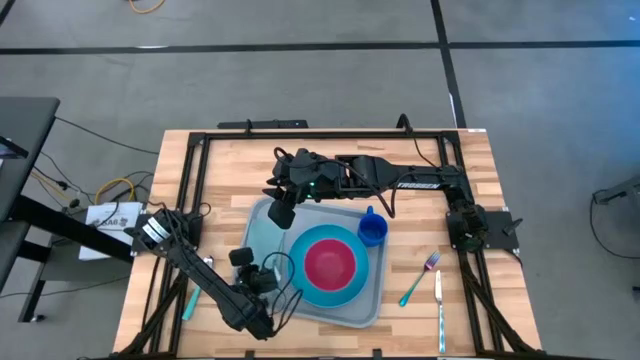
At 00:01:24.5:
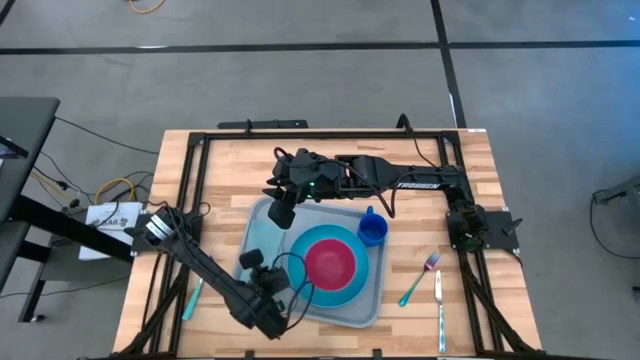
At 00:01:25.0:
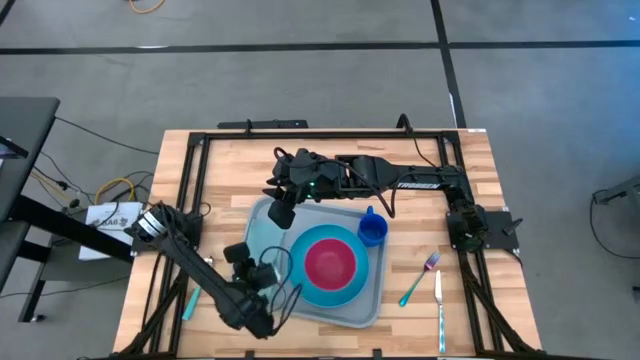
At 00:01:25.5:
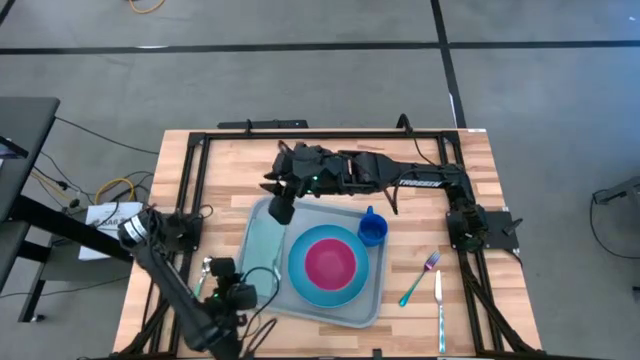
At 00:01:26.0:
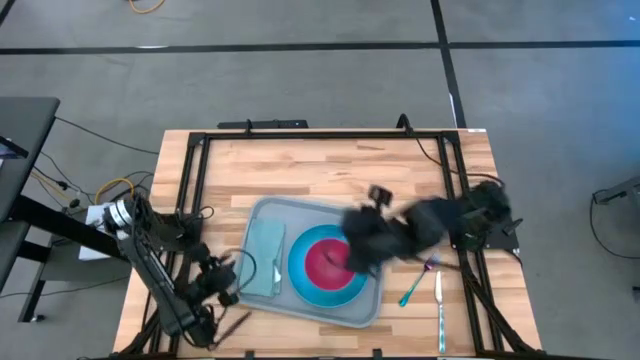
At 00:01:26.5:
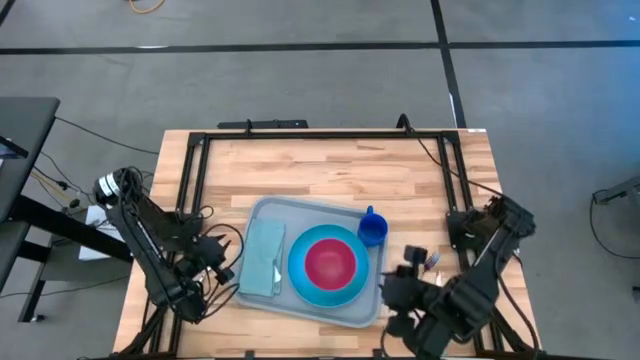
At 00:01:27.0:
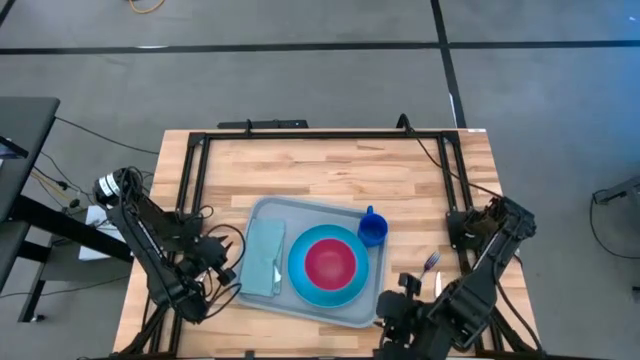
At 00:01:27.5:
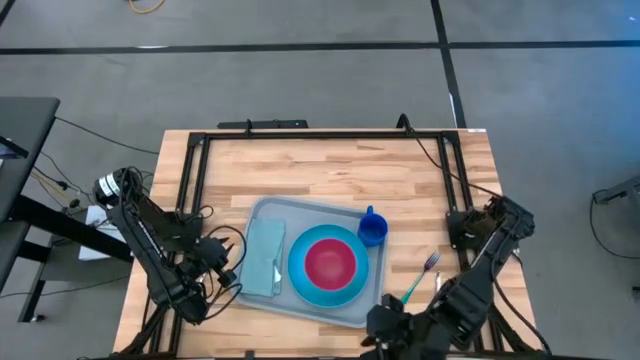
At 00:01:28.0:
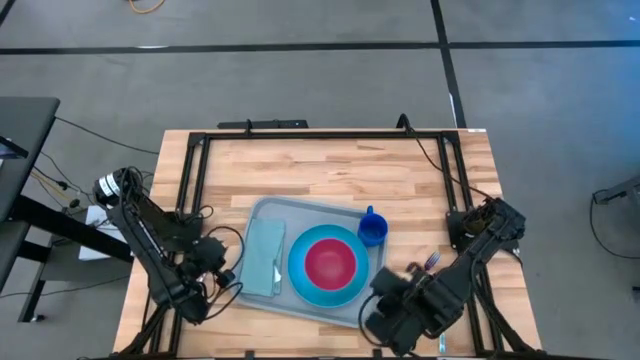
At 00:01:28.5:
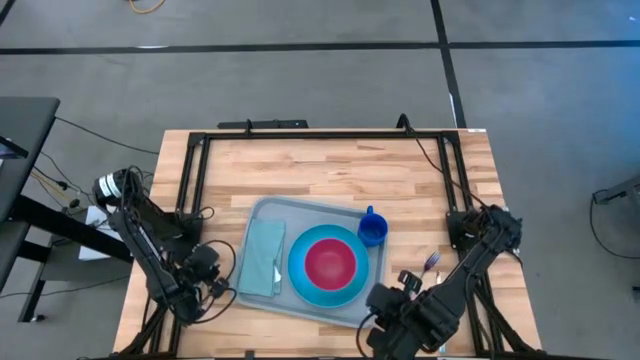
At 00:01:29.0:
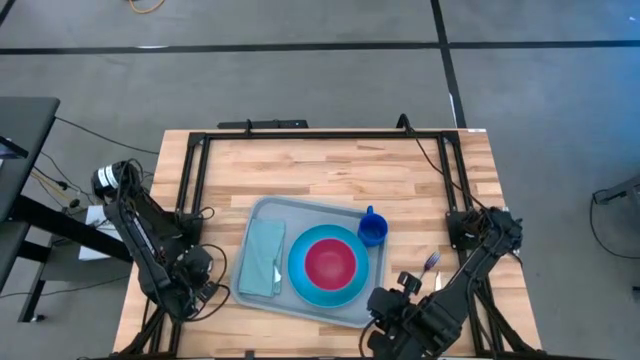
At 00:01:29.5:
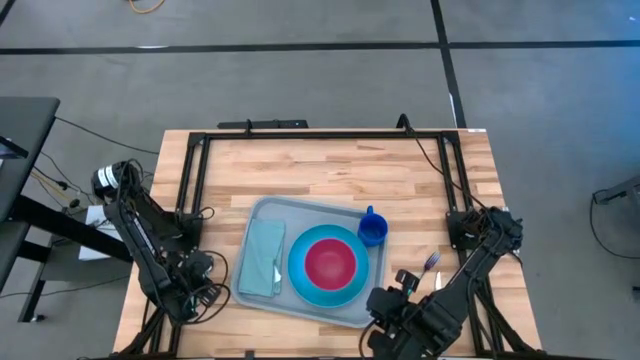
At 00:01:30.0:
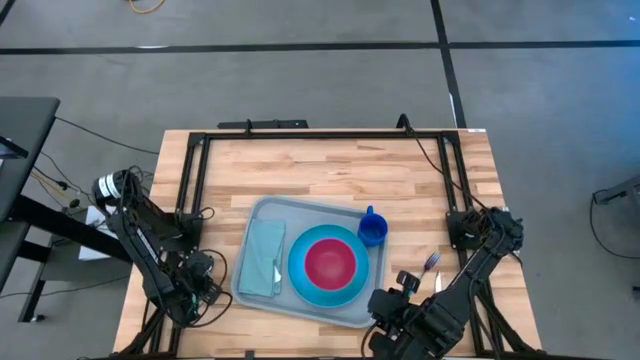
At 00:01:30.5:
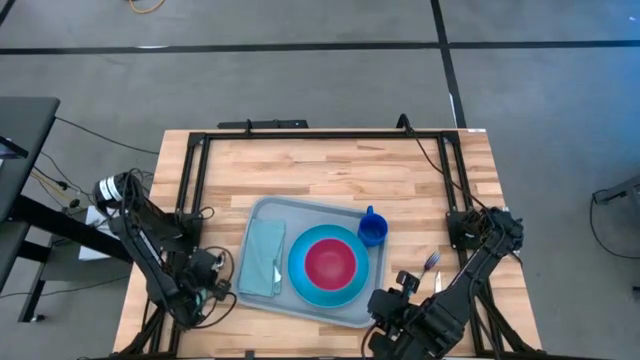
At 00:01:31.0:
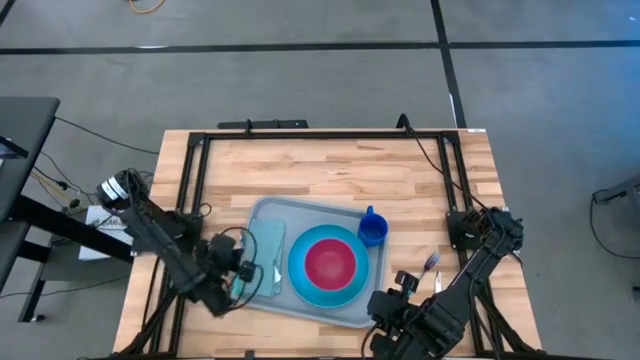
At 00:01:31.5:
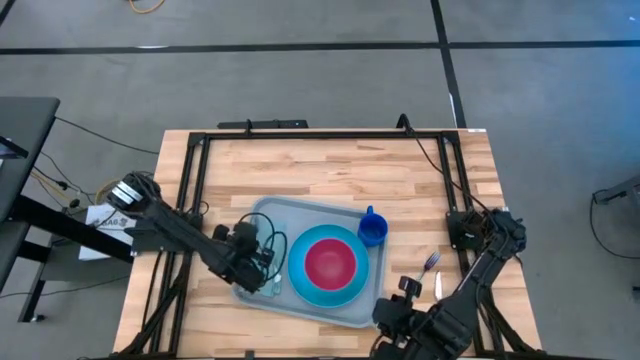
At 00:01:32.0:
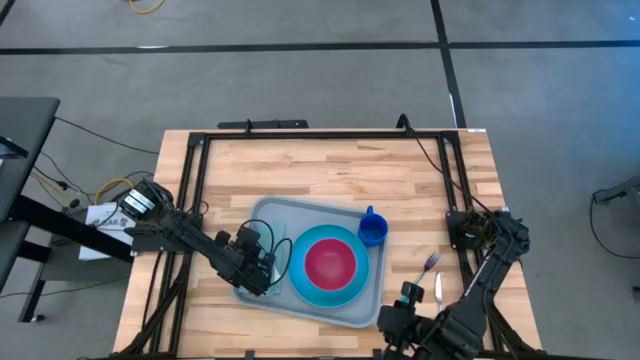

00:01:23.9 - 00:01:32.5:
Task: Set up tray
Put the light green spoon on top of the green table napkin

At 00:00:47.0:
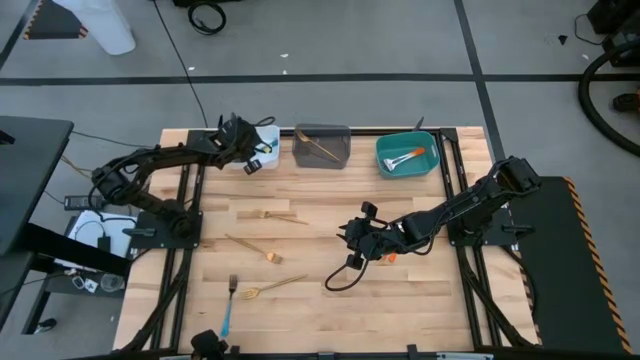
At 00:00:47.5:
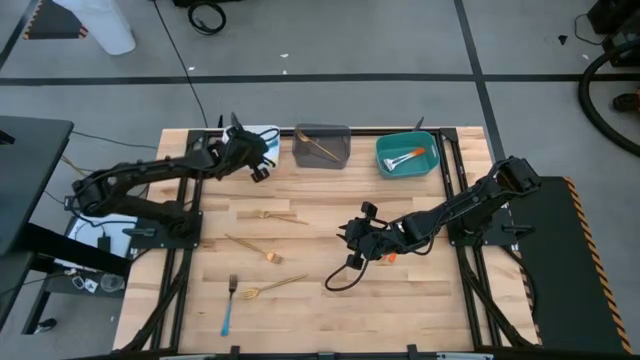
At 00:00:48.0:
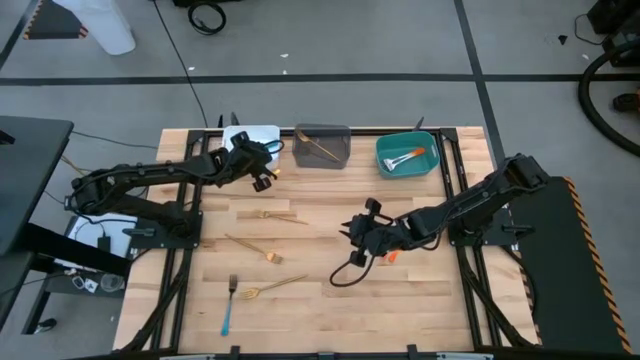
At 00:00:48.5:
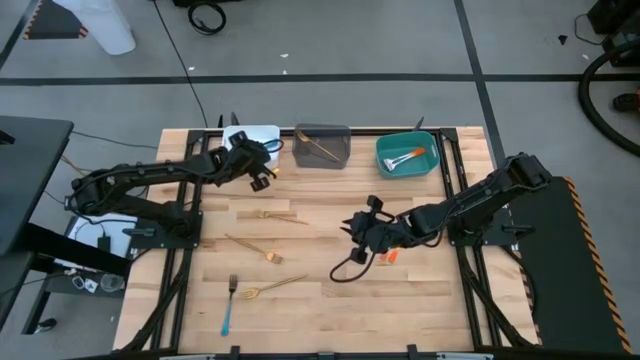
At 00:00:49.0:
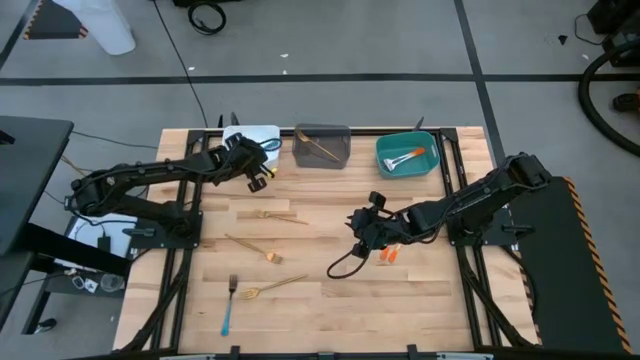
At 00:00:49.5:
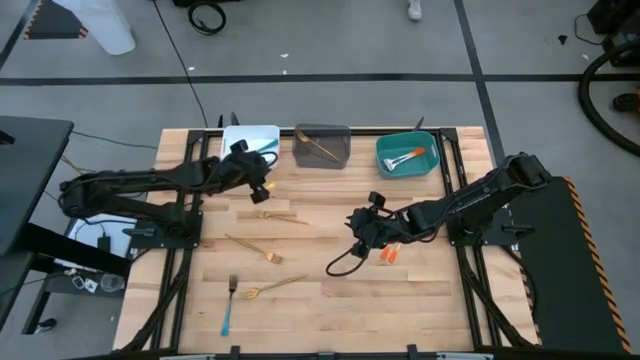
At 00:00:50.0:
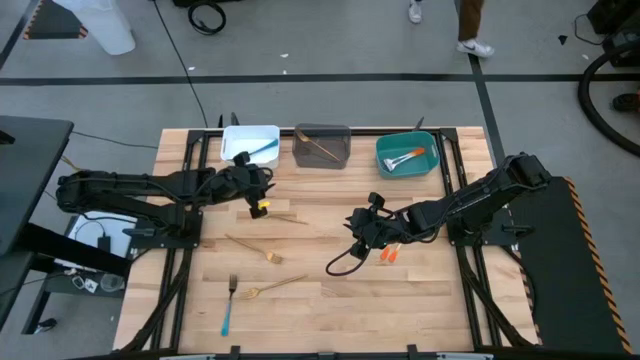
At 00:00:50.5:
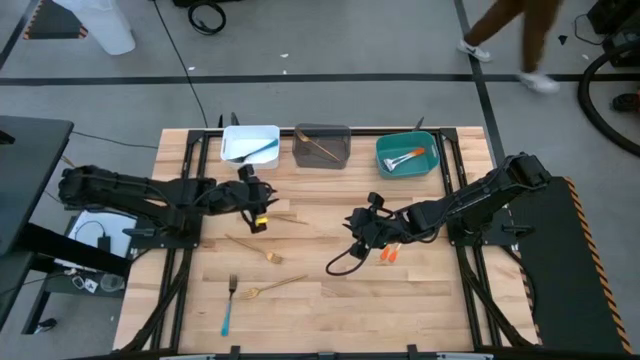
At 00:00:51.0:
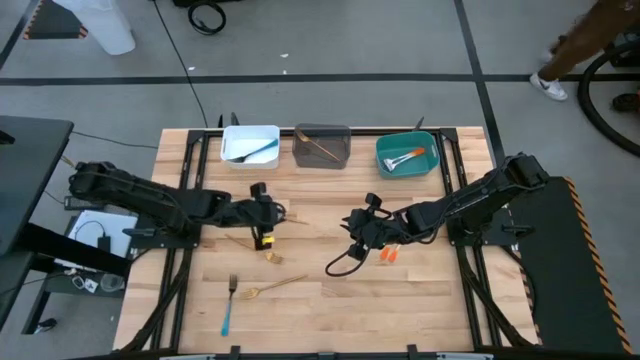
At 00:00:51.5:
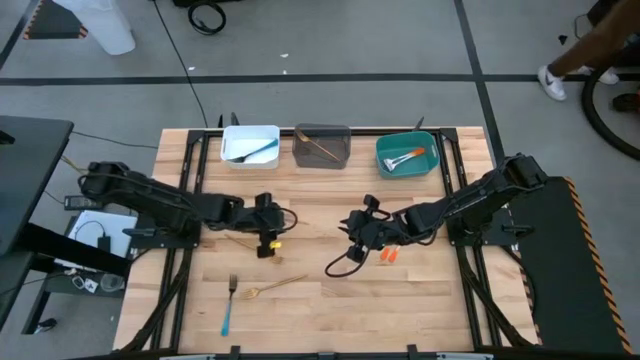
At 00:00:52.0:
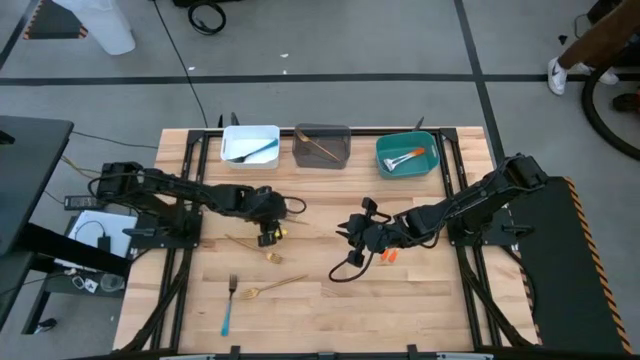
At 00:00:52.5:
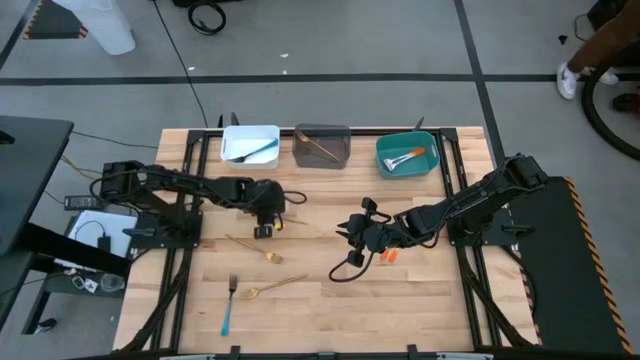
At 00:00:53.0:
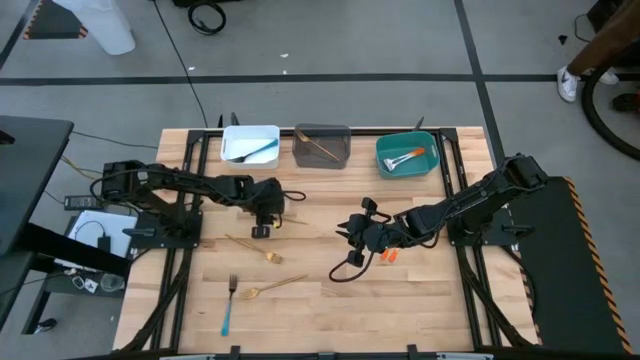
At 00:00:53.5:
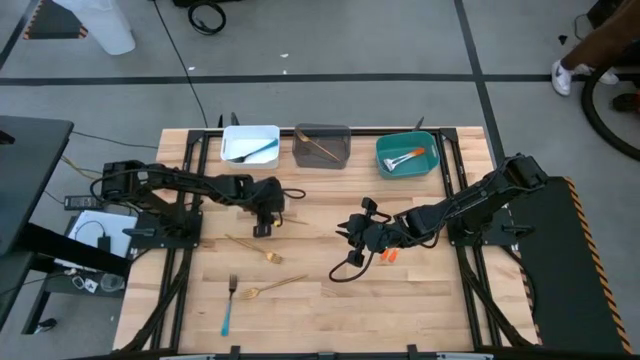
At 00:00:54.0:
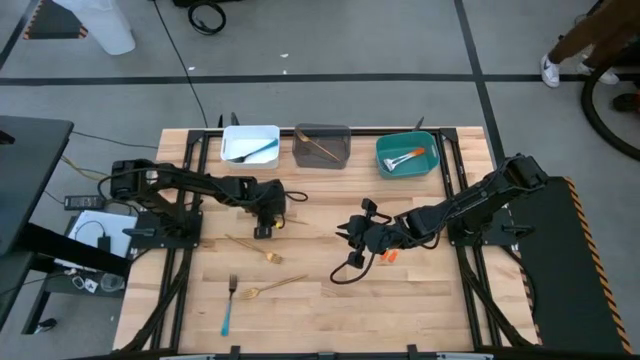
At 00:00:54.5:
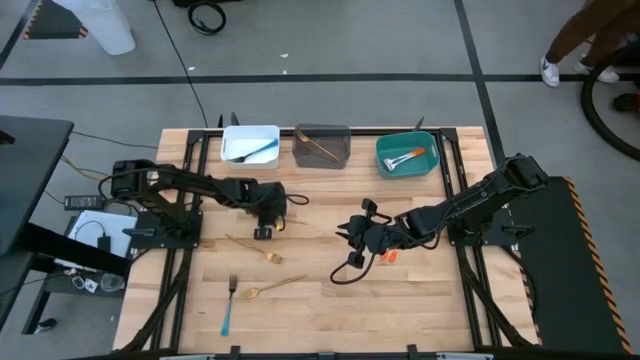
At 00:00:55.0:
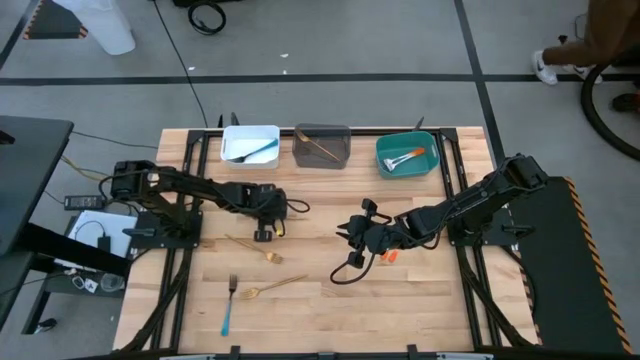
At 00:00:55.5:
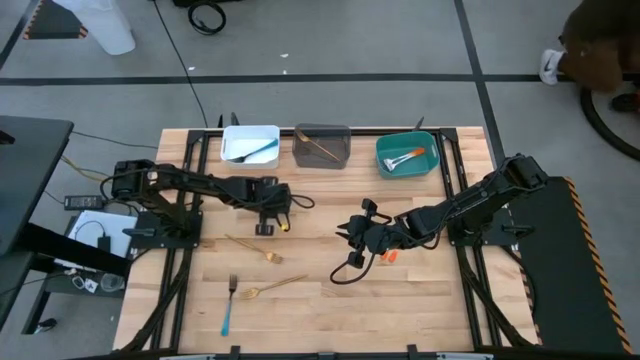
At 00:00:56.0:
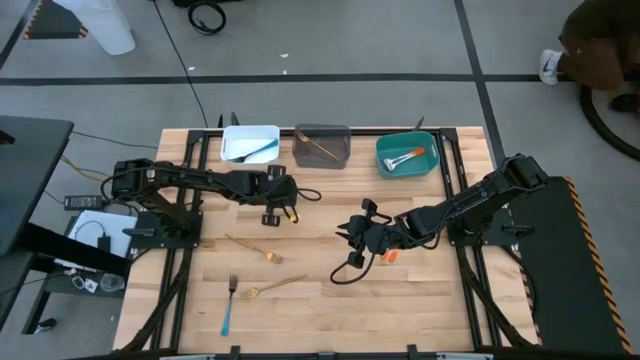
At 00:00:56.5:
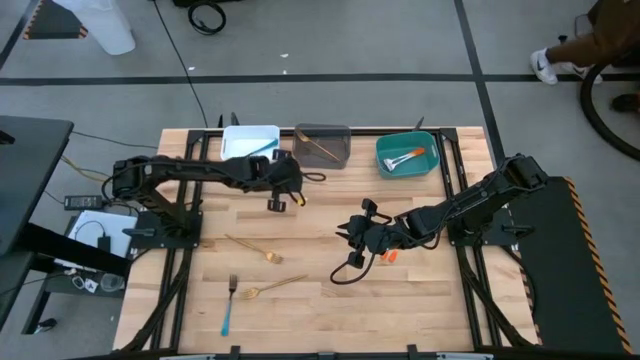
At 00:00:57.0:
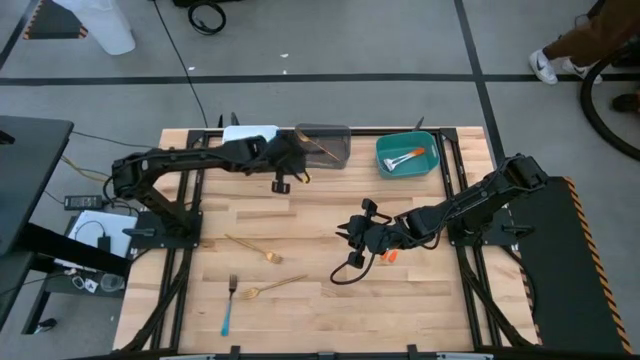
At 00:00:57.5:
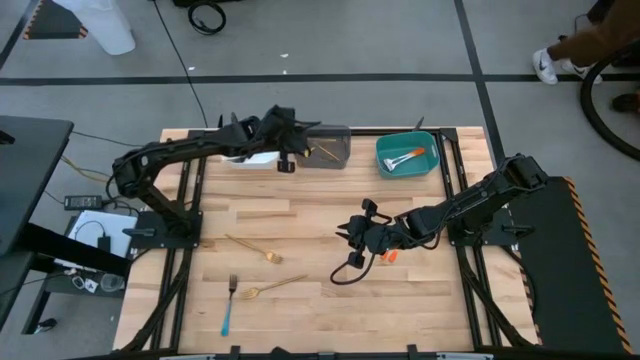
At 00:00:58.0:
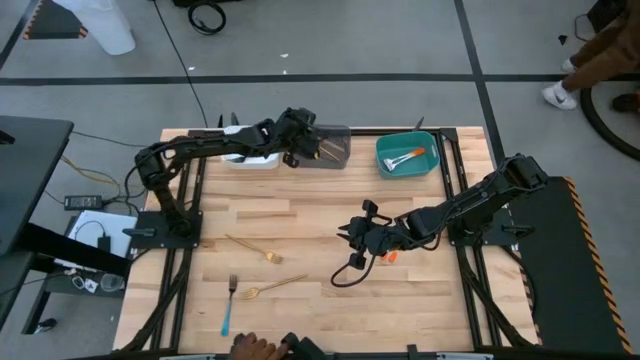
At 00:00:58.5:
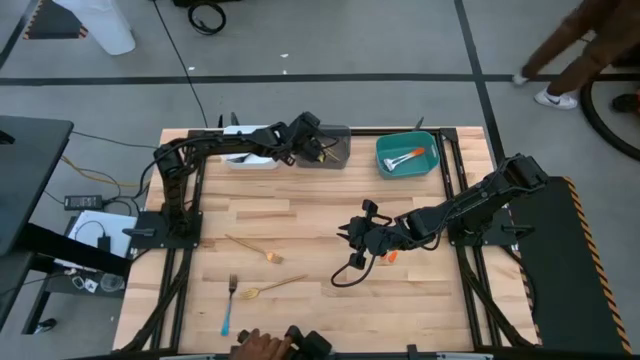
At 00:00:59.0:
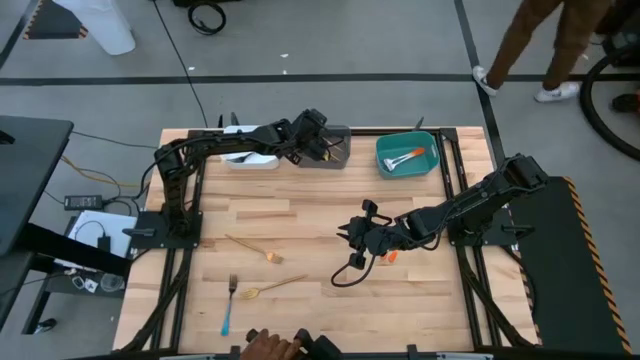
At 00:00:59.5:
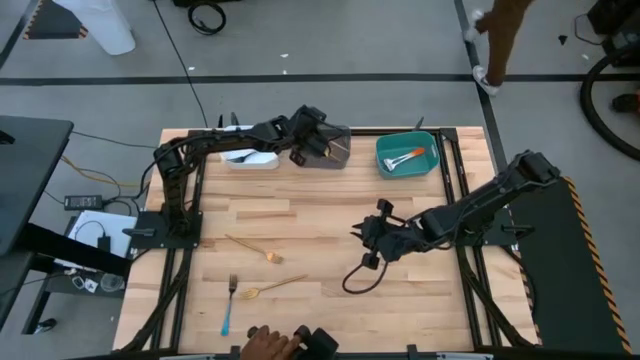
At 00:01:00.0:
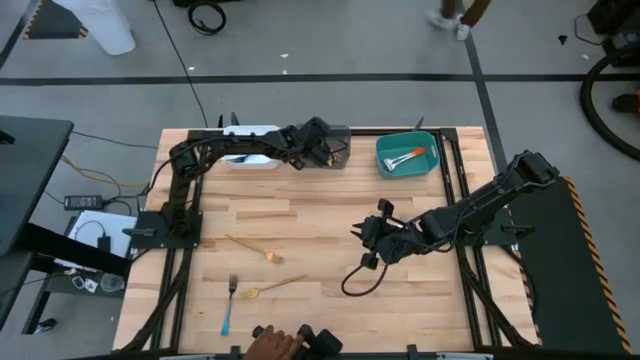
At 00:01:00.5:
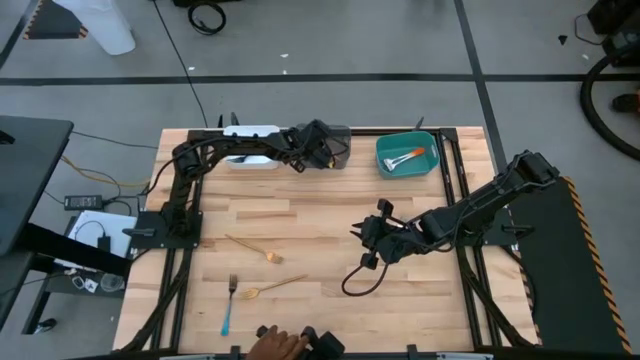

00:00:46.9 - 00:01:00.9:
Task: Sort silverware by color (type)
Put the top gold fork into the black bin
